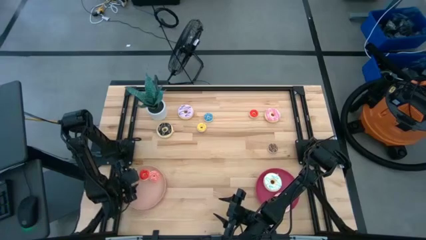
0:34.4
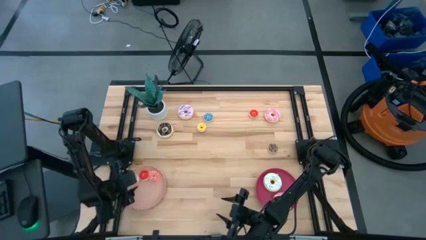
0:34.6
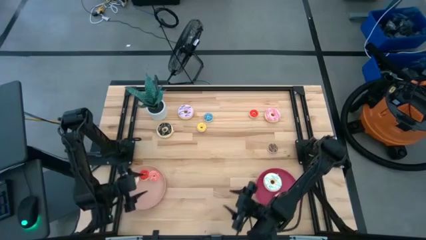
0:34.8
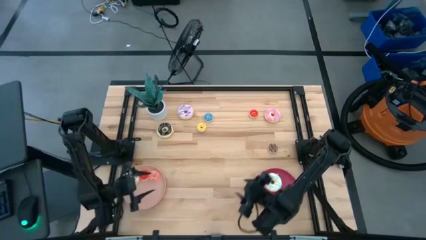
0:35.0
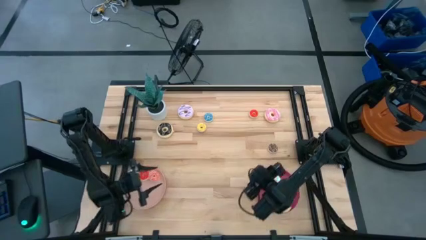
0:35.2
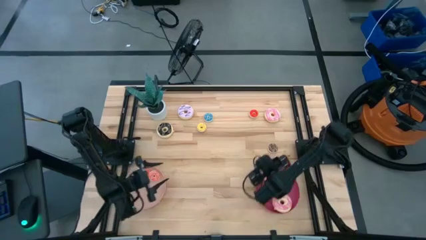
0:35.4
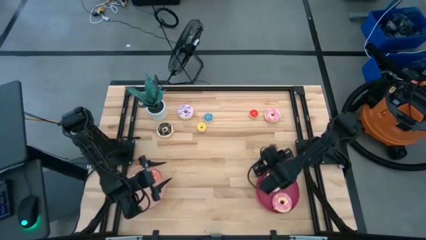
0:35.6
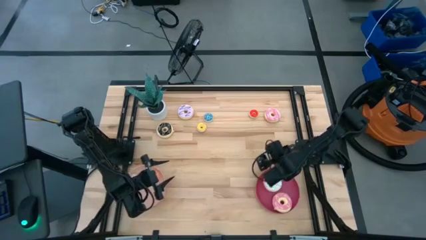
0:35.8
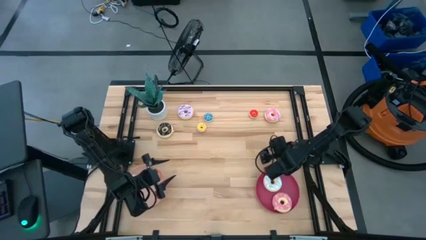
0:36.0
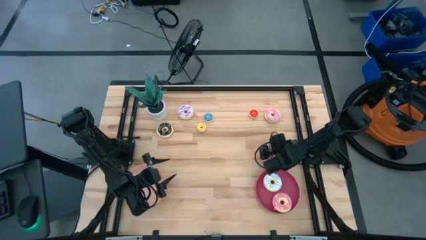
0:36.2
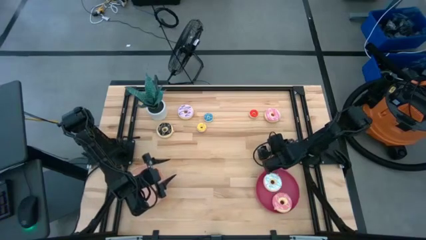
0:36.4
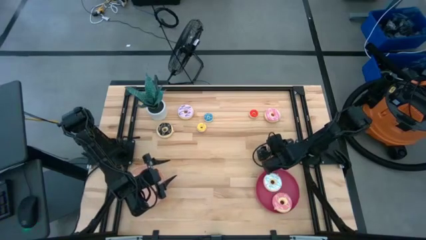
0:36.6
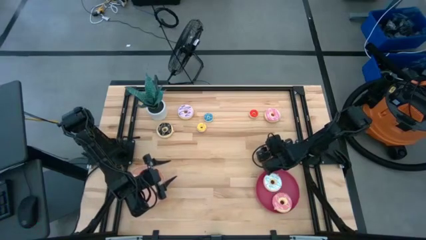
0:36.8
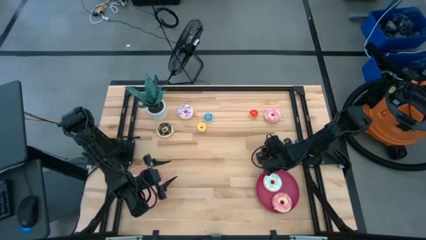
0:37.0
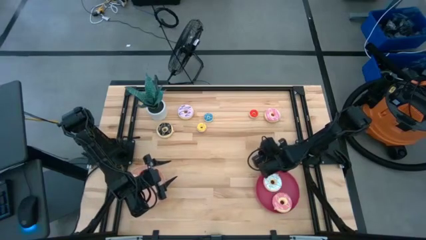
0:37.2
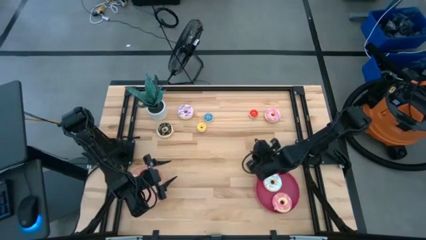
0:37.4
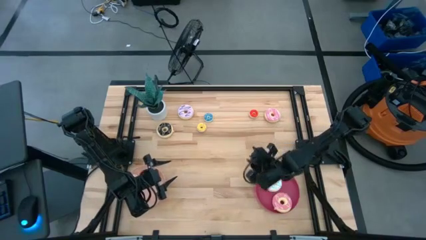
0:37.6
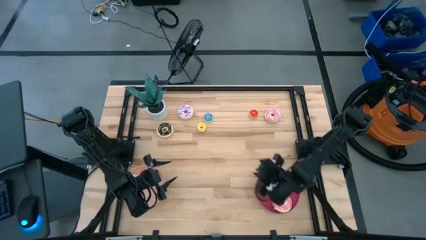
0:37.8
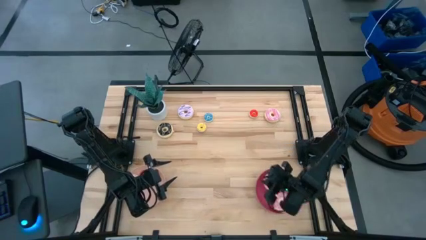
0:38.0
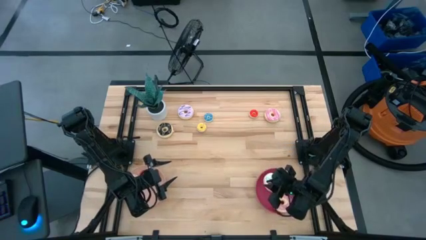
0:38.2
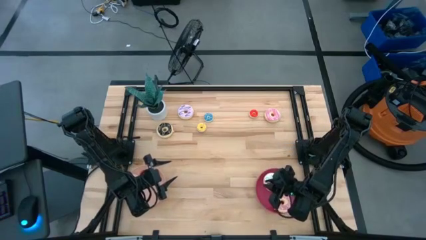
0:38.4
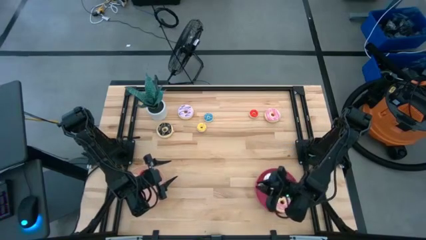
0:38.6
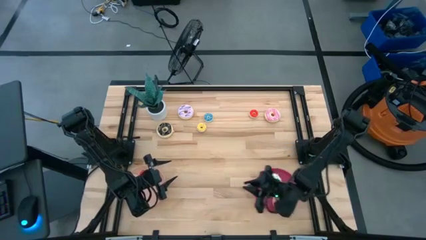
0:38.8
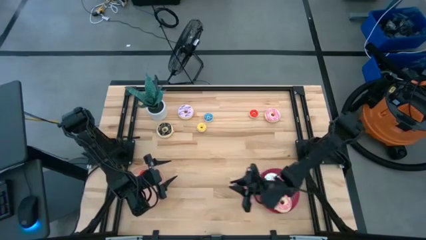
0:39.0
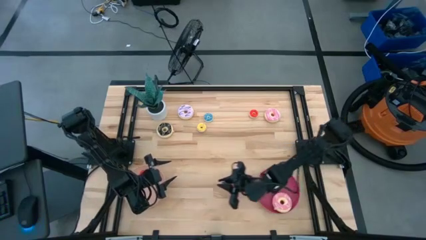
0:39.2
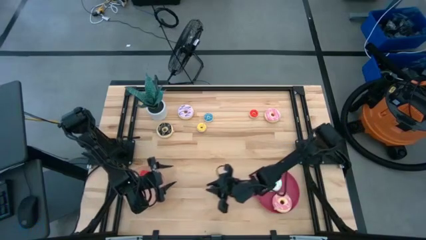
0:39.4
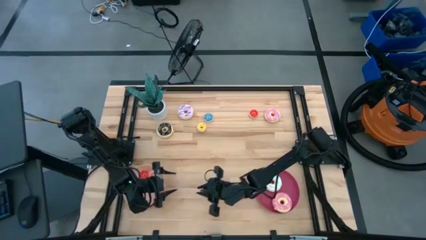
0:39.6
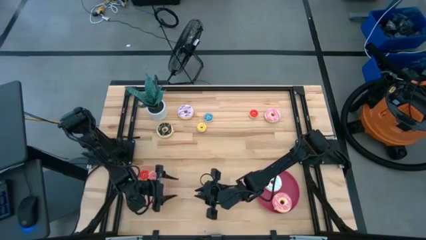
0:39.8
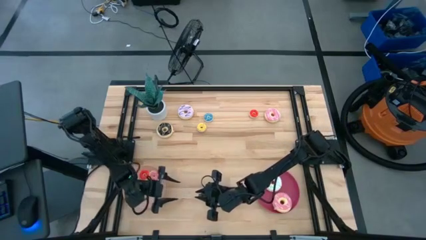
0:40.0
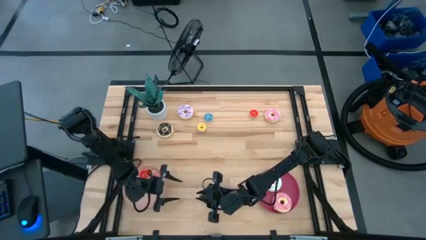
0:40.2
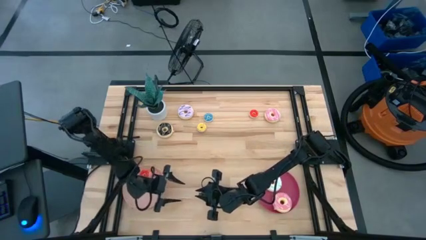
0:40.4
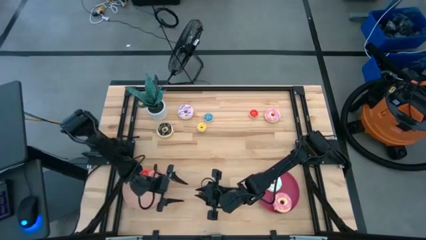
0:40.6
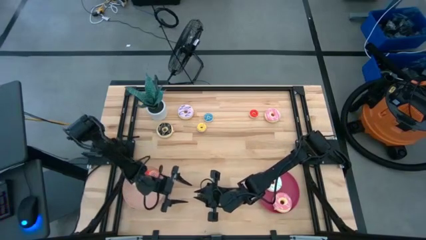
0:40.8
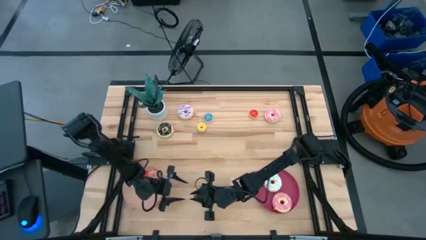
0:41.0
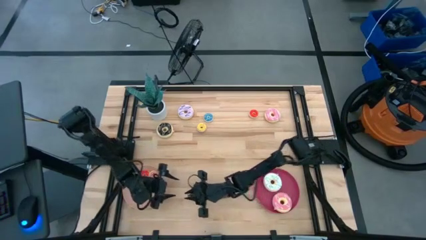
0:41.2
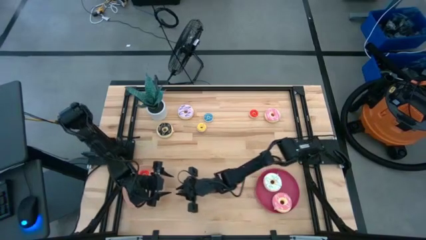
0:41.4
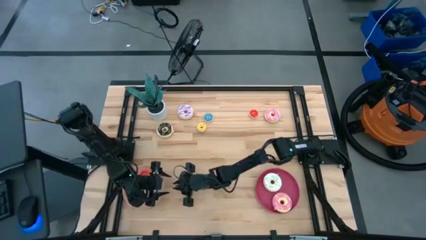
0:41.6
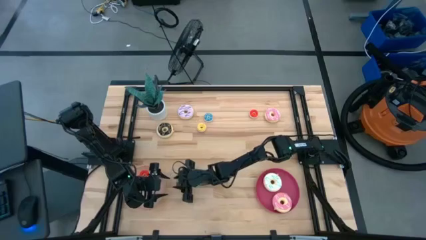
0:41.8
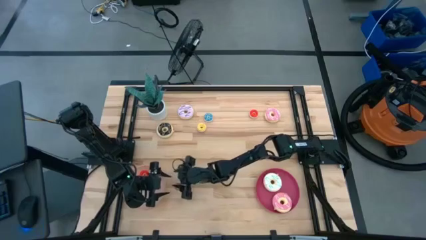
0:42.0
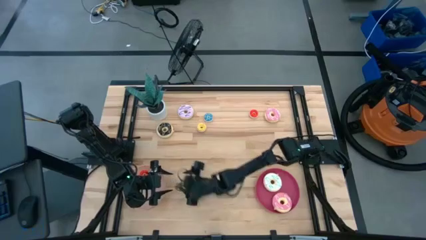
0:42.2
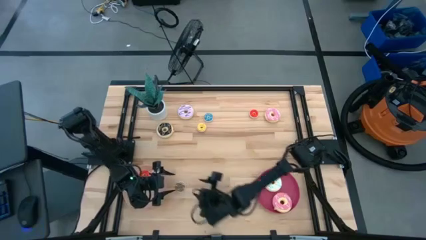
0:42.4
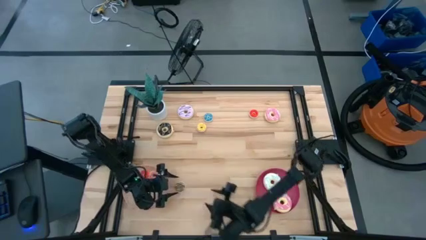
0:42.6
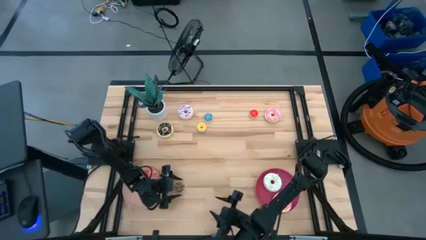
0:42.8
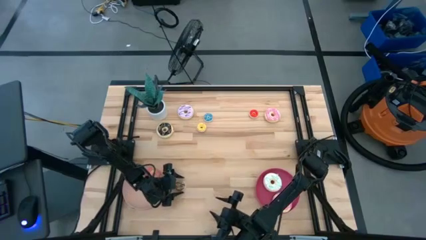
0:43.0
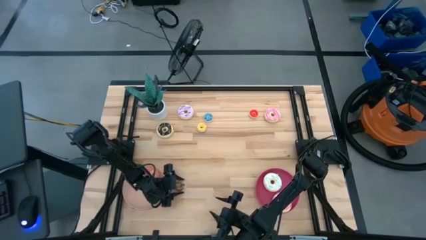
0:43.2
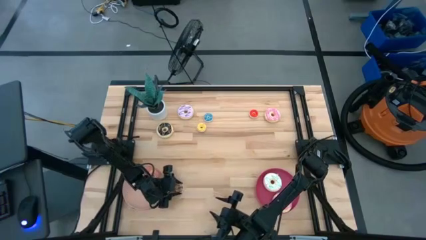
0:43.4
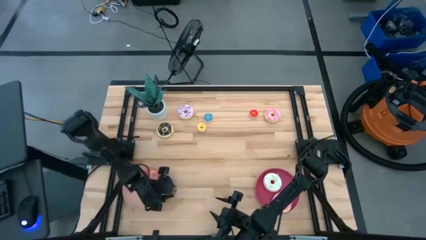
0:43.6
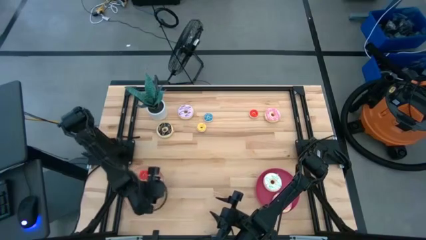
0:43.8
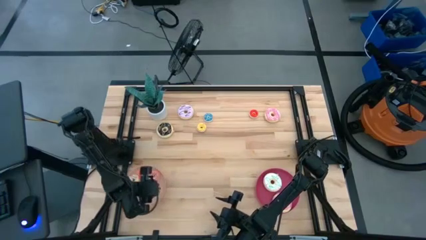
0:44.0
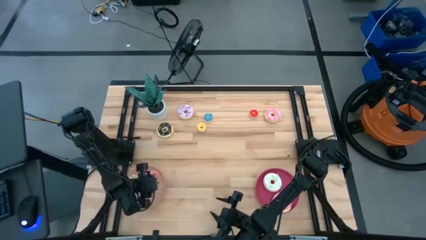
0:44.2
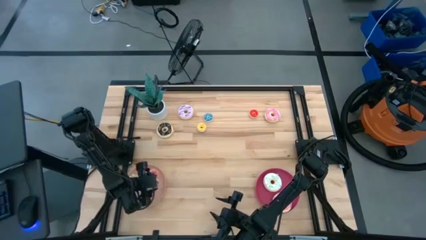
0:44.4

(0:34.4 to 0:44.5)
Task: Pick & Place donuts
Put the small brown donut on the light pink plate

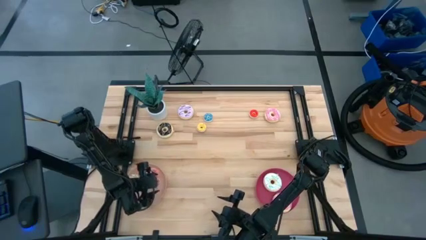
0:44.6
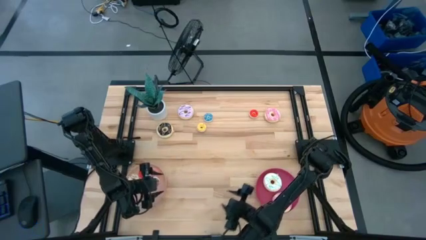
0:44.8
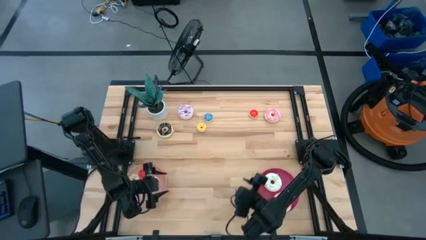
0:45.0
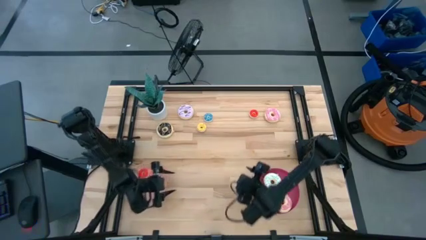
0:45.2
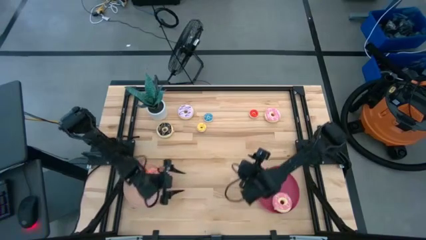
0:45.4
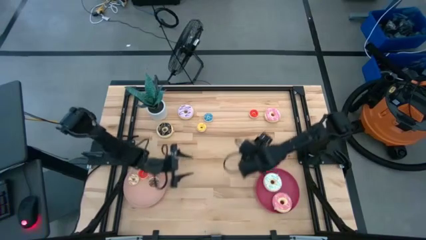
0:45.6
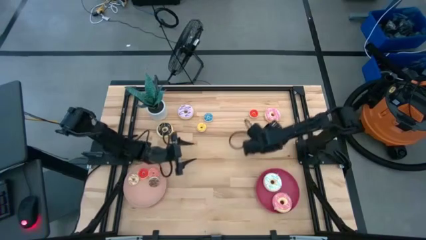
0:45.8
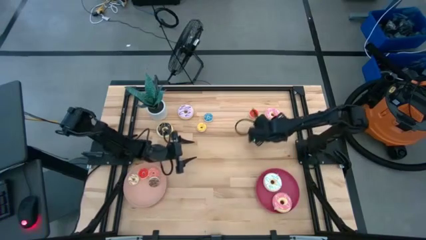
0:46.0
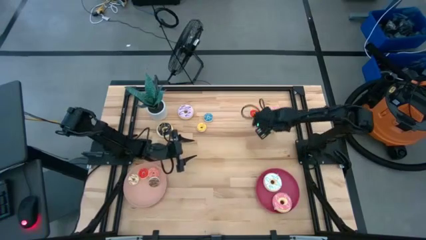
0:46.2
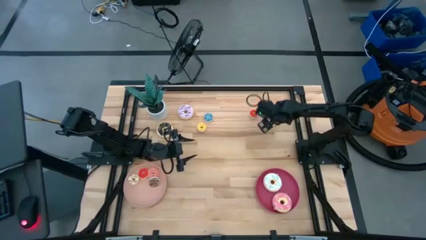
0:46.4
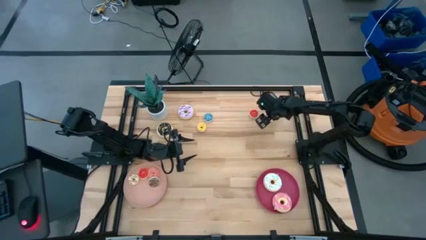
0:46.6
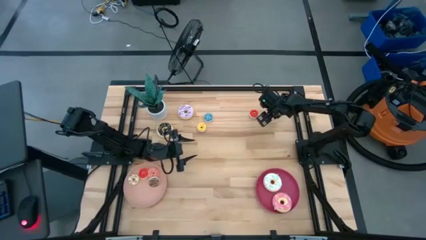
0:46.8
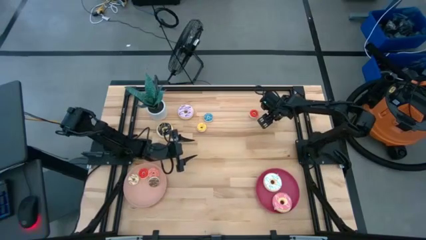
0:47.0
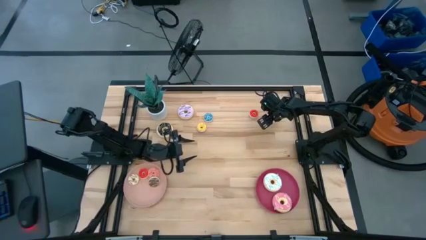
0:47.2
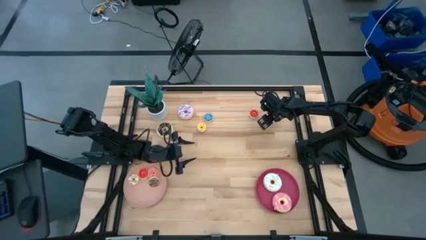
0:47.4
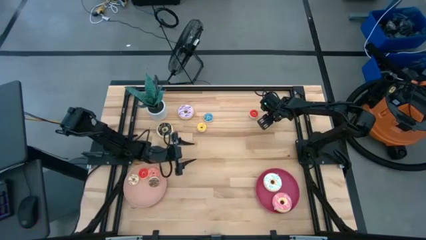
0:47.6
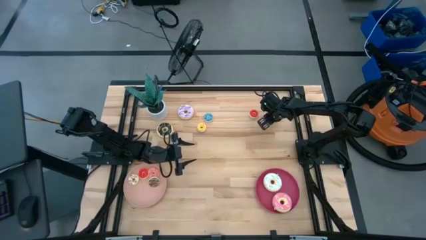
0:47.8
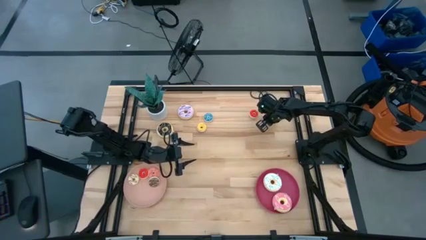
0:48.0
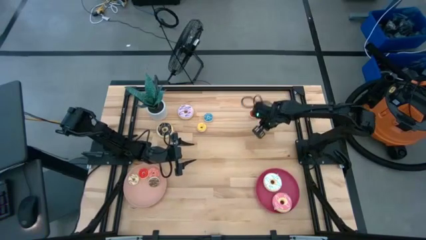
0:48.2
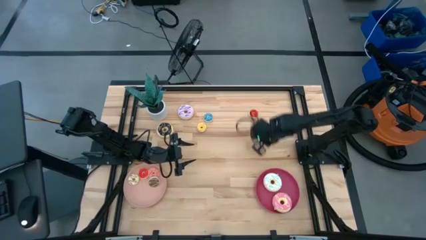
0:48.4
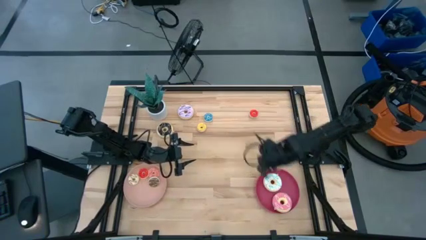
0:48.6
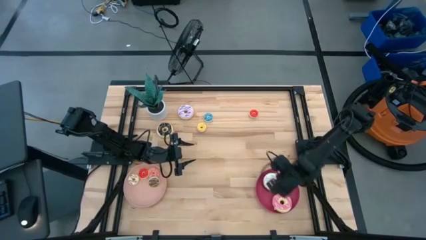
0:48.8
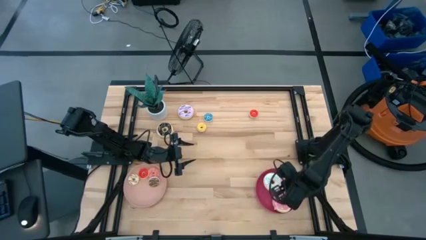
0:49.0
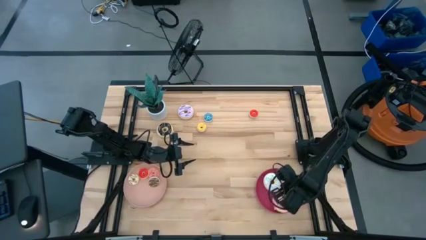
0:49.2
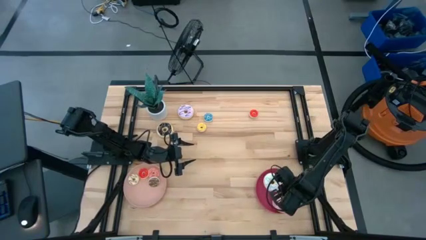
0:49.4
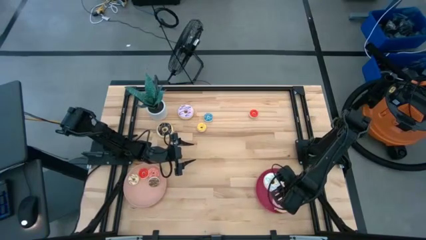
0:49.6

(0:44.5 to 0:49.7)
Put the big pink donut on the dark pink plate

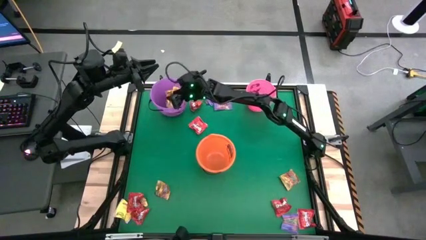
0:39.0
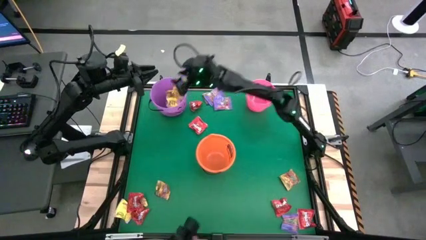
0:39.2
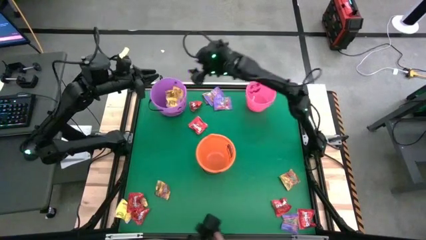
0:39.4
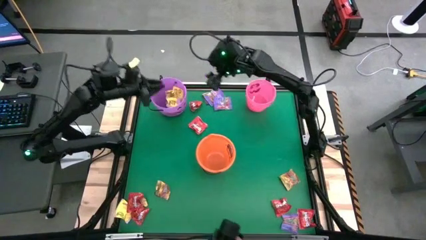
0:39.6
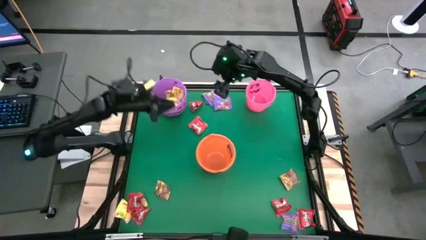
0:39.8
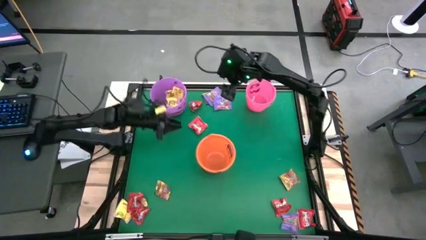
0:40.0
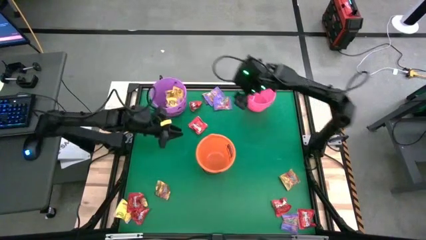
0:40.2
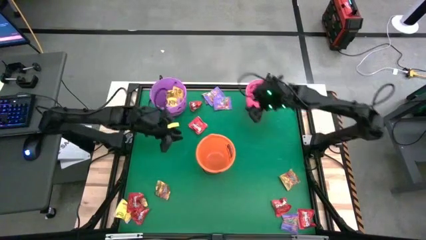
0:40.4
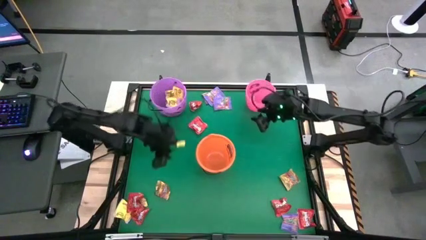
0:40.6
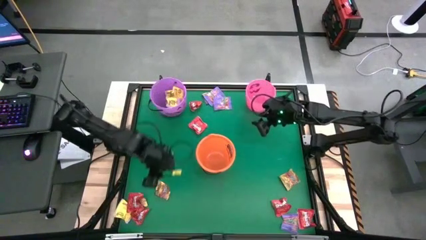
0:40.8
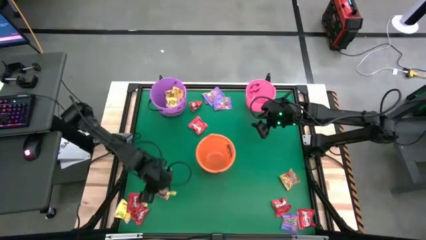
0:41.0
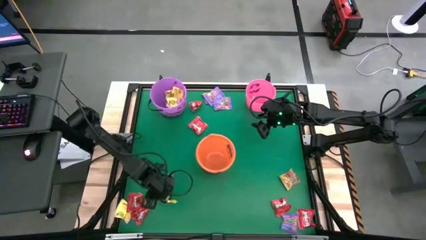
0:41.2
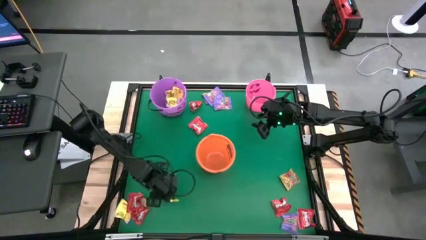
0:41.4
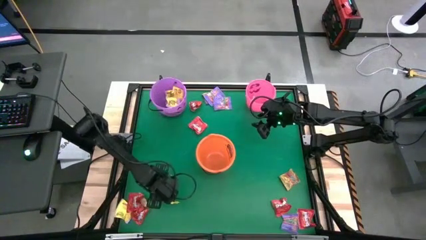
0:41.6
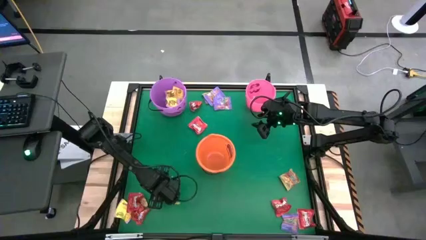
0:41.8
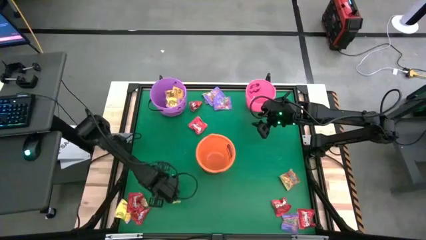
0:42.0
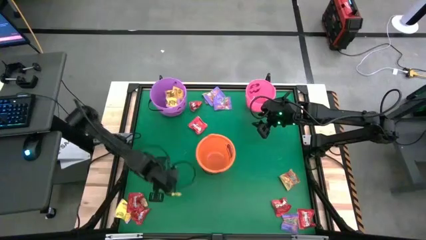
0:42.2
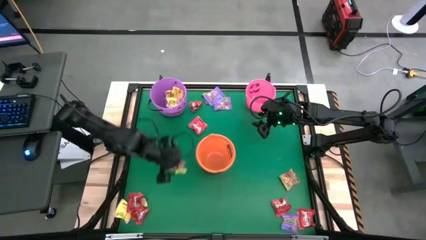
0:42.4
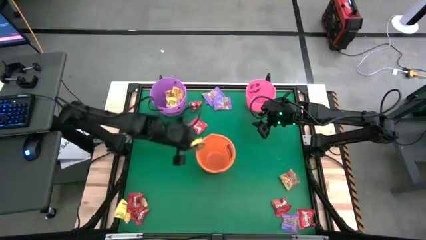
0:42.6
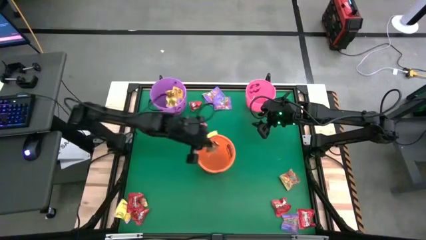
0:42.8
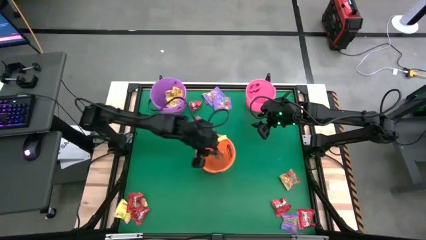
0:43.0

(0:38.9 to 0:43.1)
Task: Sort candy by brand, put in halloween buckets
Put the yellow-red candy into the orange bucket
